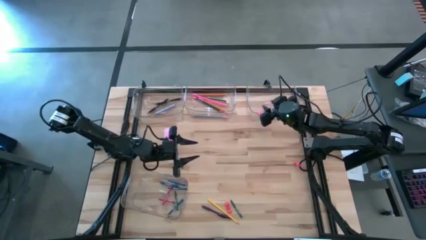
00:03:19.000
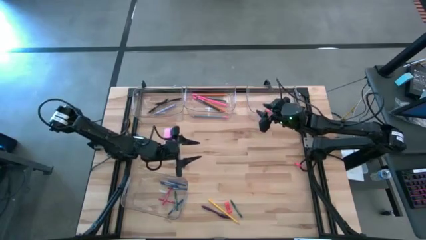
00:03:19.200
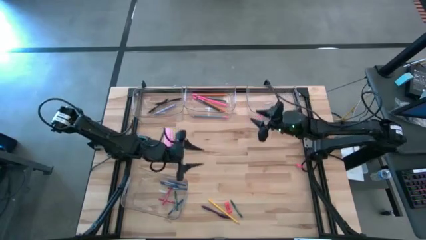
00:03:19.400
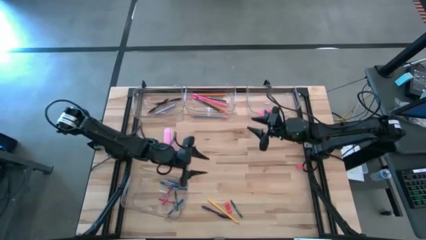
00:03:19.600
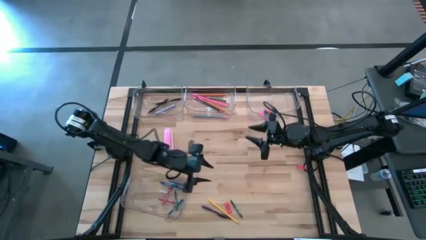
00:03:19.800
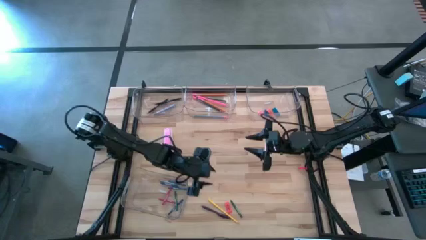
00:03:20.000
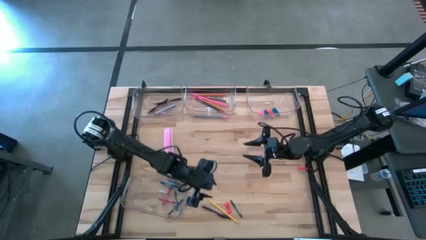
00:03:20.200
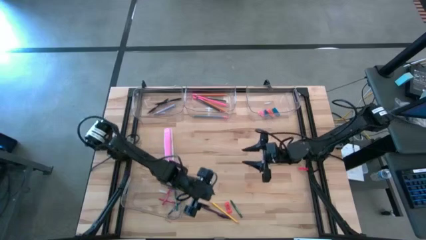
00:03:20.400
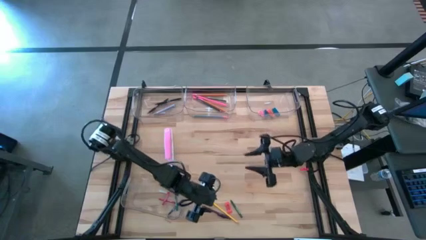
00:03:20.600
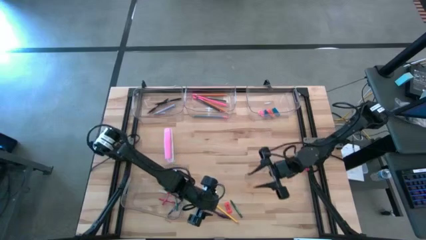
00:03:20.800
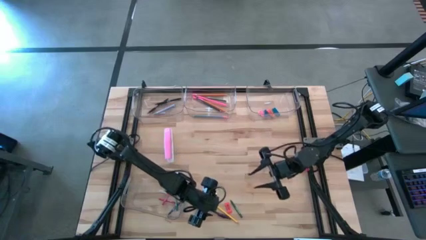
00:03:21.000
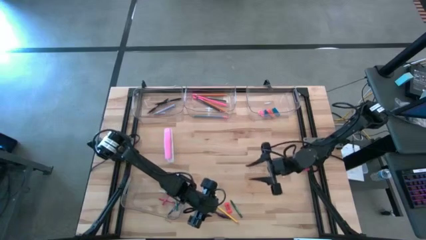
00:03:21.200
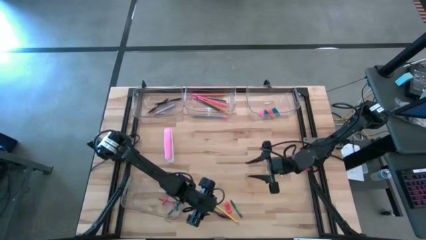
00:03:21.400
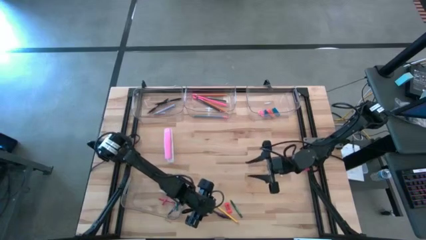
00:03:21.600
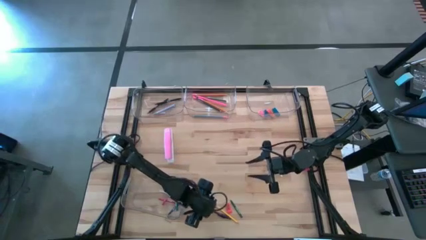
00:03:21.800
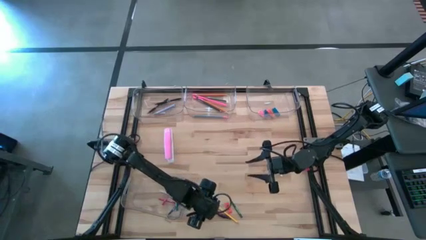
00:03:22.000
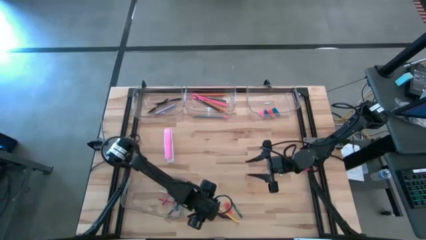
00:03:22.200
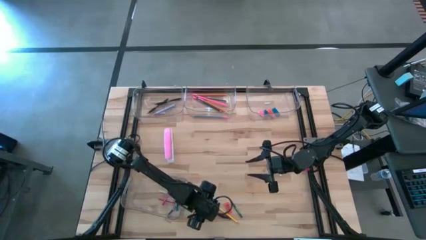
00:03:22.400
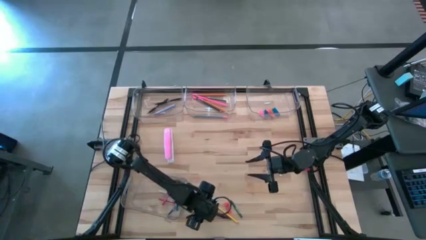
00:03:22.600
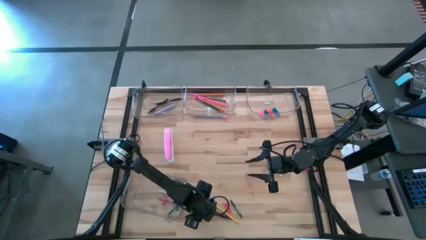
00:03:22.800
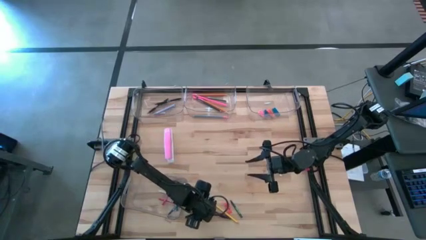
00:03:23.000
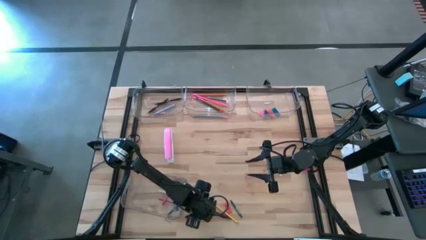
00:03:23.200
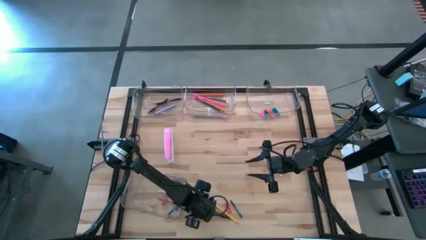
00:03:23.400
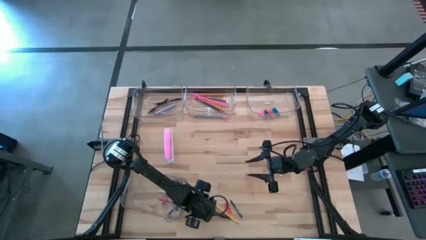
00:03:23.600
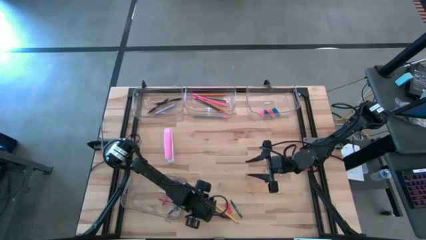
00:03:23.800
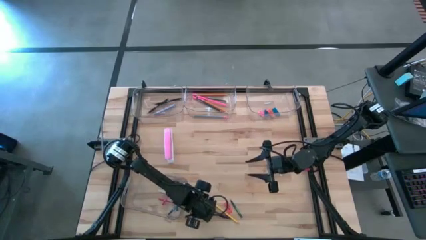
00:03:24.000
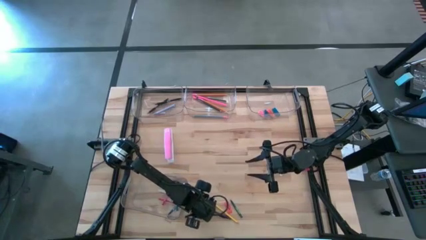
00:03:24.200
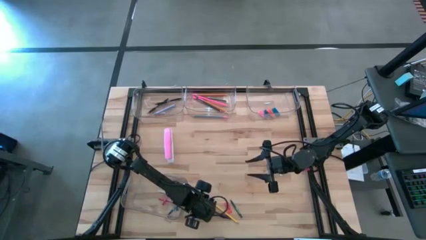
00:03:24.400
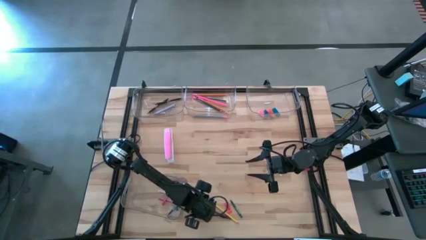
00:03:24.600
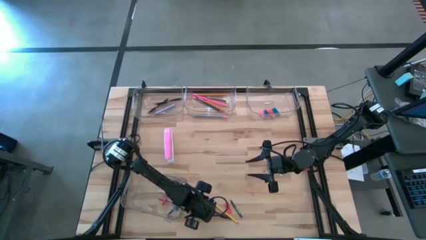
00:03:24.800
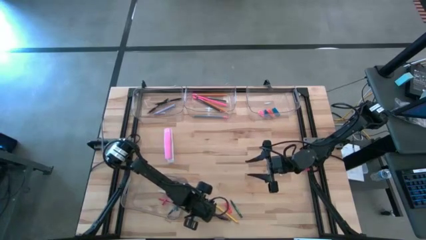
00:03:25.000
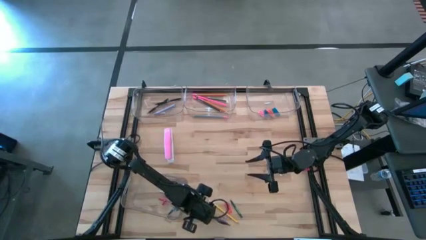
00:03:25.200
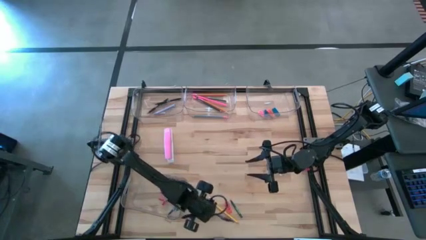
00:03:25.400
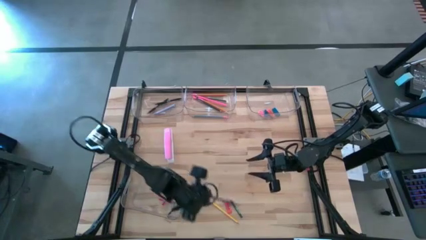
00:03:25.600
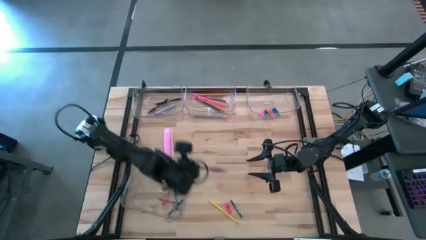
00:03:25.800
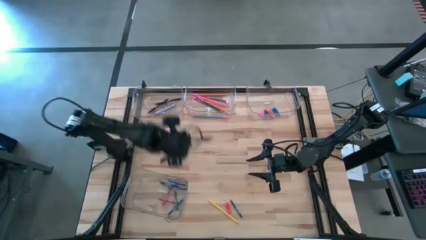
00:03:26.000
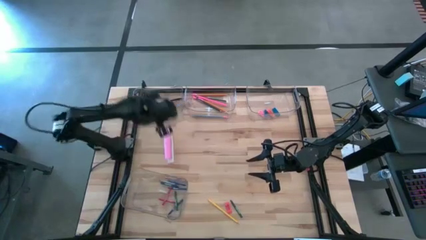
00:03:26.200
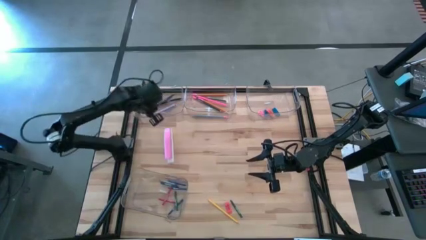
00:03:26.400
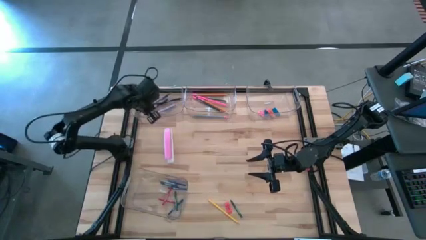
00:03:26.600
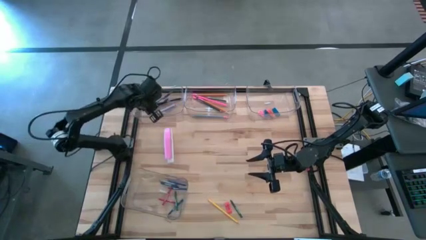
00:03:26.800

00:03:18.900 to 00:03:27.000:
Task: Sort crayons/erasers/pens/pencils in bins
Put the purple pen into the top left transparent bin

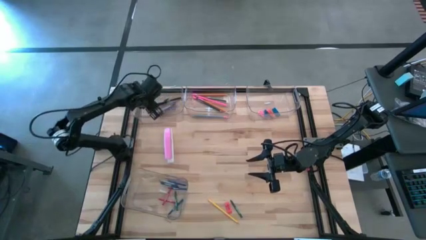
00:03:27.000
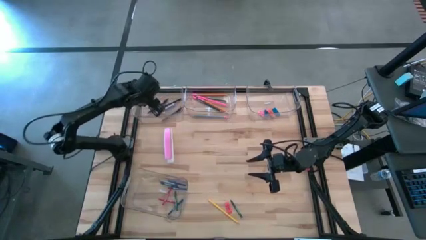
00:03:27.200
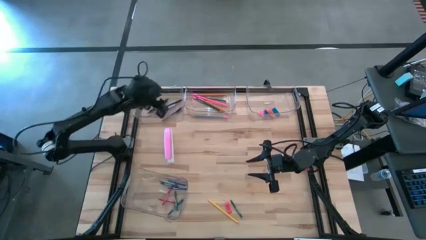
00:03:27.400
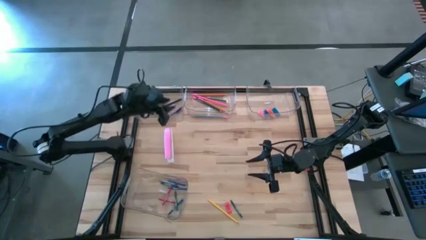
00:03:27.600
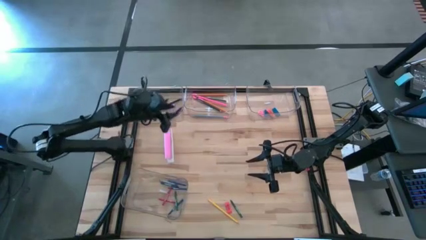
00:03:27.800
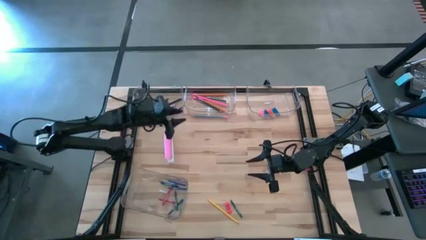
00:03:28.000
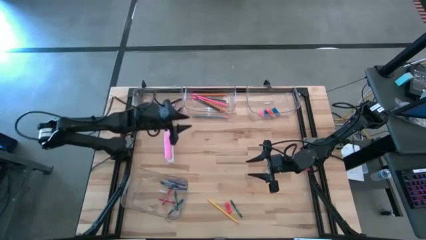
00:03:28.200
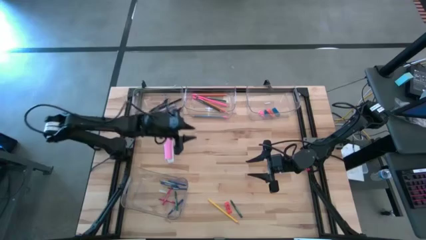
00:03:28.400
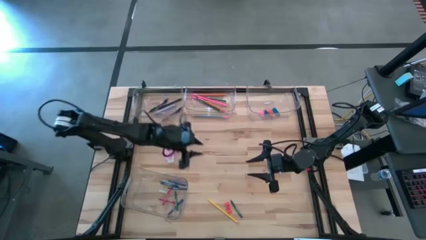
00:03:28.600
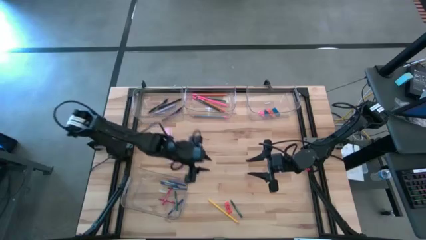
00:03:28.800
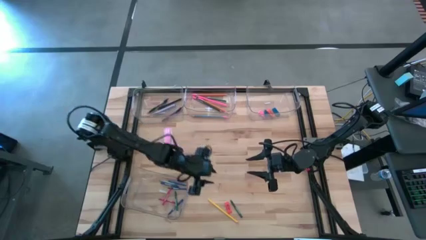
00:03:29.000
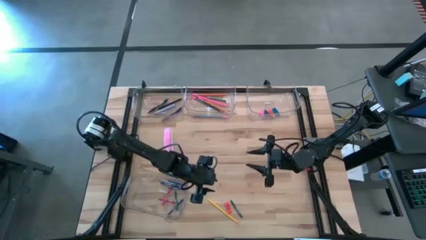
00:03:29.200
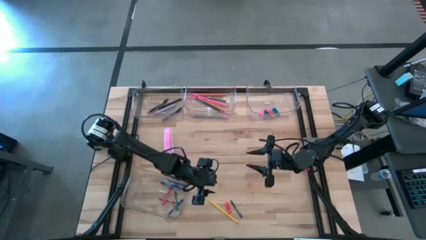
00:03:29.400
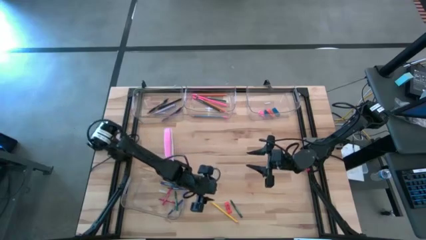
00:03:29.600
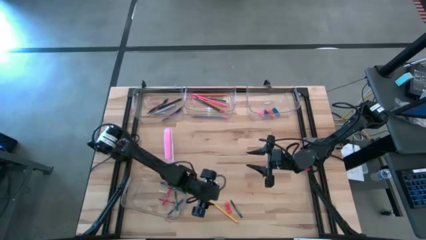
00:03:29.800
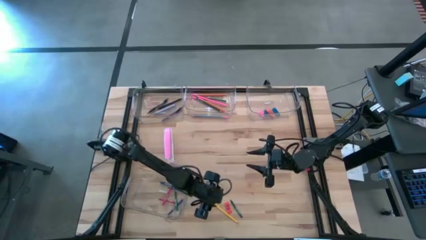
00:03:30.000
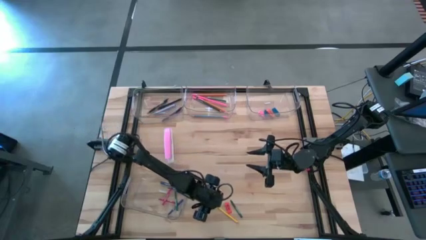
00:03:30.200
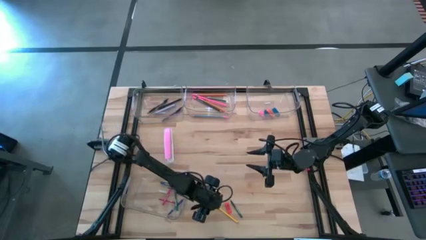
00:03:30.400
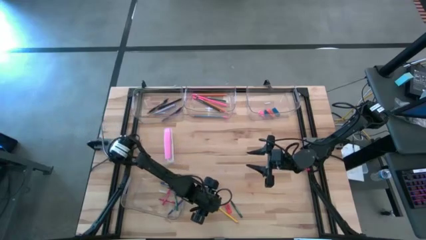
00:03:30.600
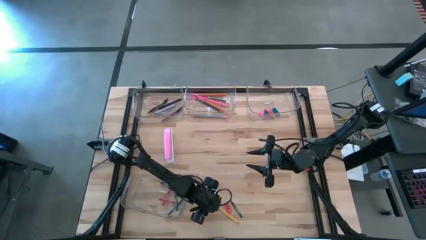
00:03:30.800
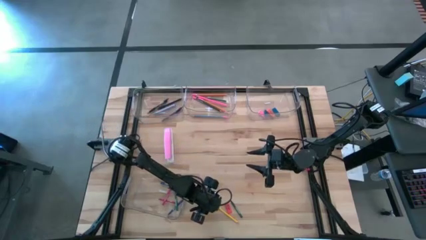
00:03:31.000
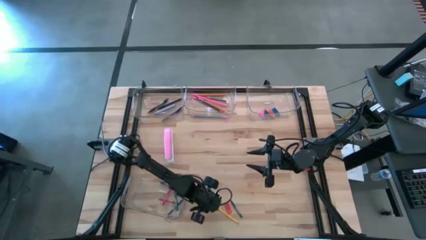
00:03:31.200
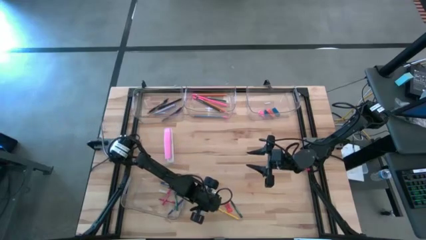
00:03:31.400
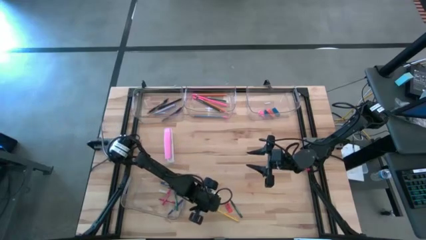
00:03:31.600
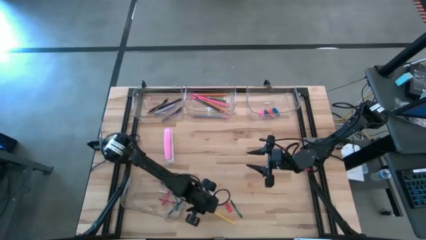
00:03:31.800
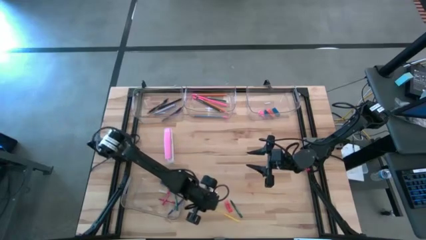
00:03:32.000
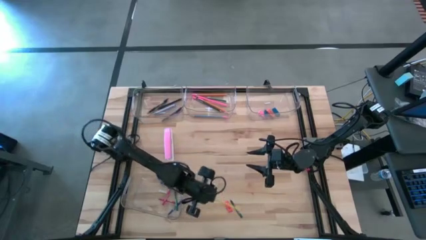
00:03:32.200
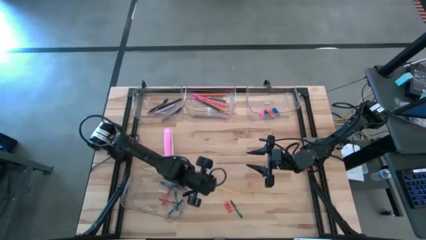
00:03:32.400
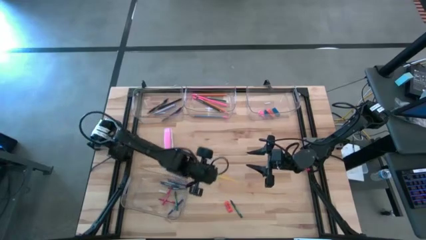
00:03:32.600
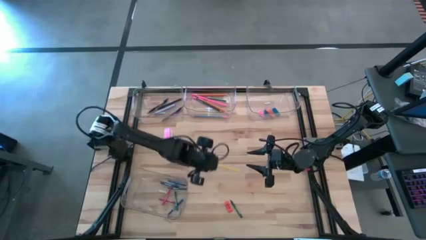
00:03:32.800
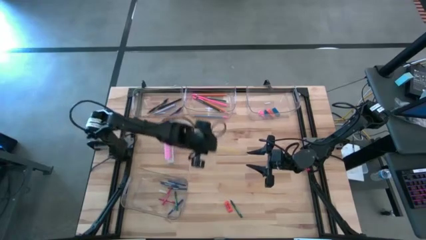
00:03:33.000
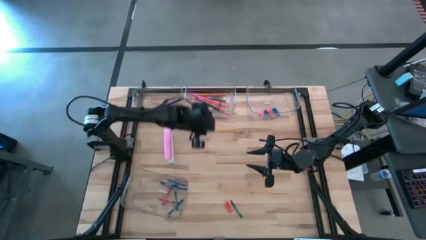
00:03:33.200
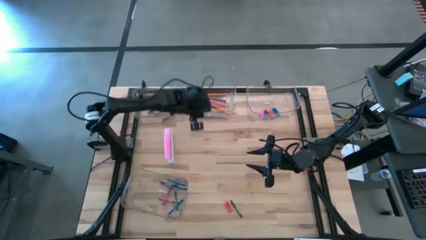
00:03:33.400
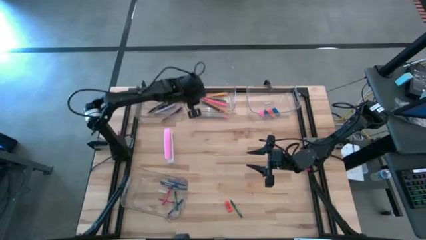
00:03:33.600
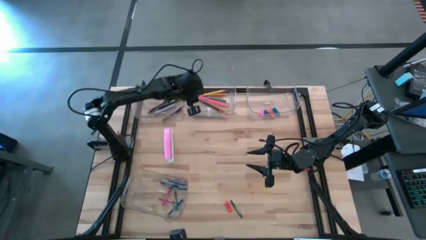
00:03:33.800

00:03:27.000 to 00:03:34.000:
Put the yellow pencil into the top middle transparent bin
